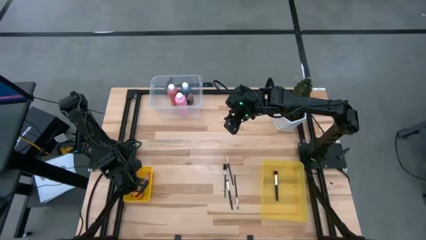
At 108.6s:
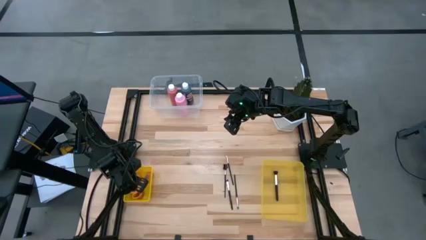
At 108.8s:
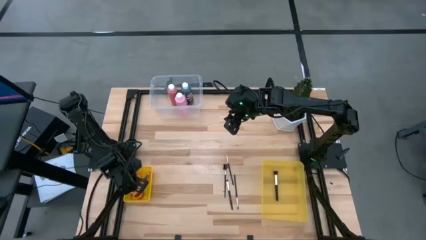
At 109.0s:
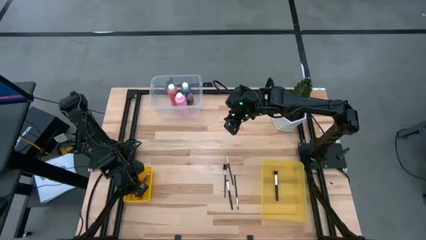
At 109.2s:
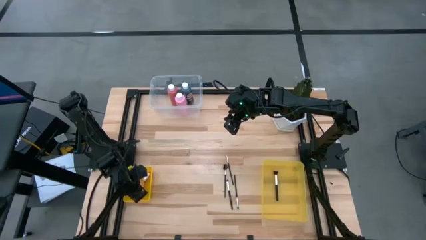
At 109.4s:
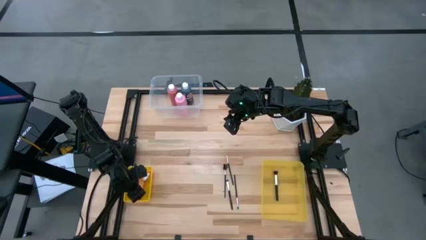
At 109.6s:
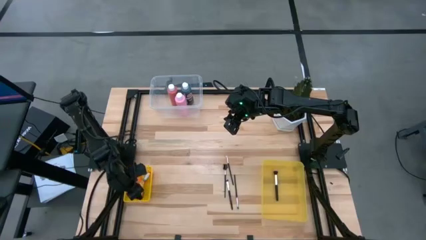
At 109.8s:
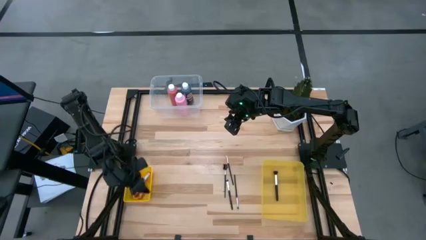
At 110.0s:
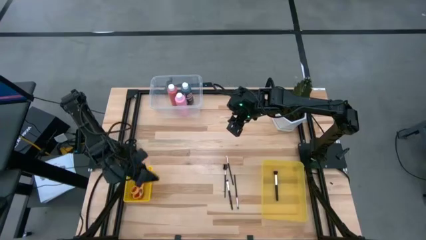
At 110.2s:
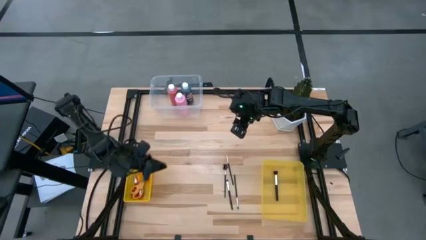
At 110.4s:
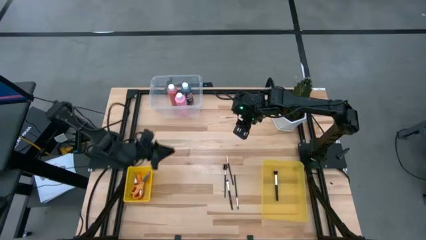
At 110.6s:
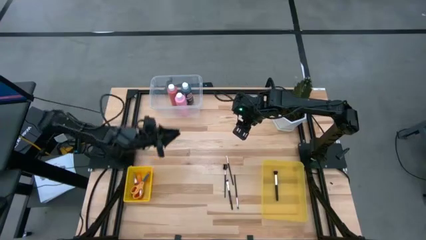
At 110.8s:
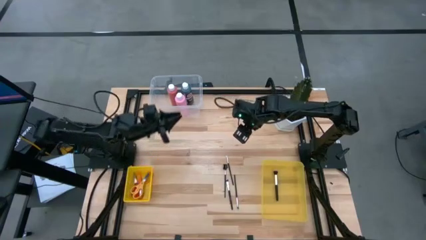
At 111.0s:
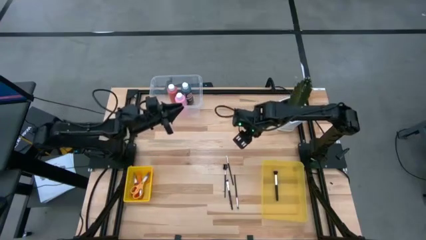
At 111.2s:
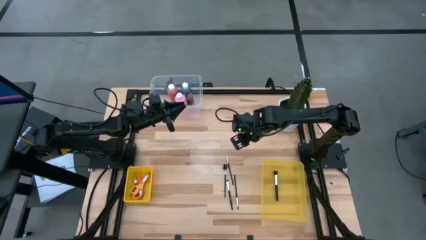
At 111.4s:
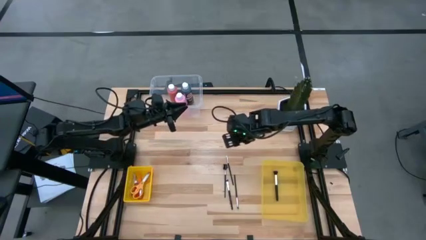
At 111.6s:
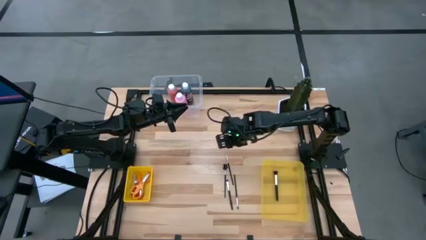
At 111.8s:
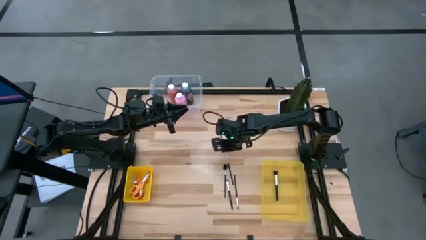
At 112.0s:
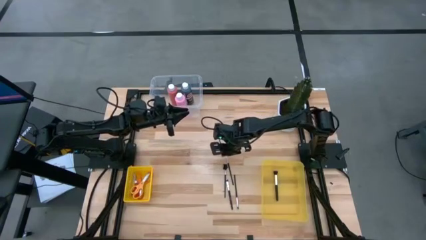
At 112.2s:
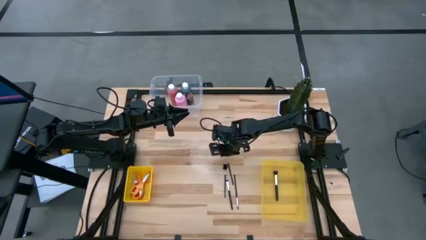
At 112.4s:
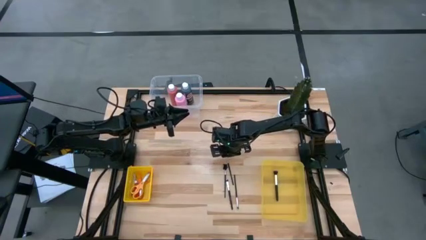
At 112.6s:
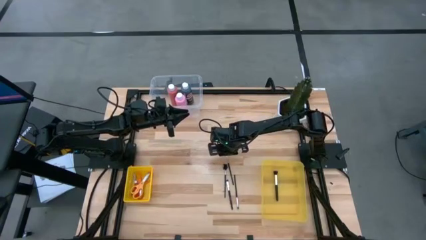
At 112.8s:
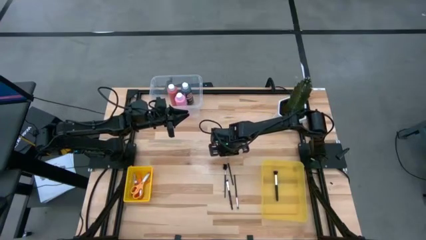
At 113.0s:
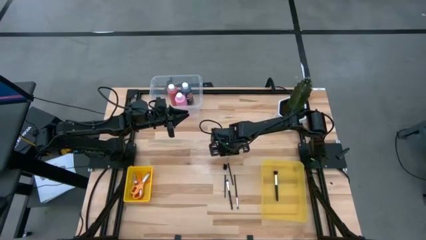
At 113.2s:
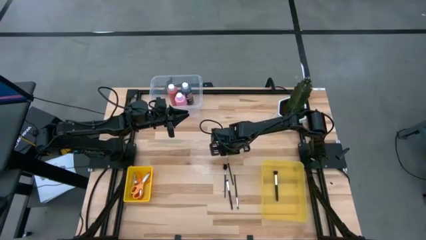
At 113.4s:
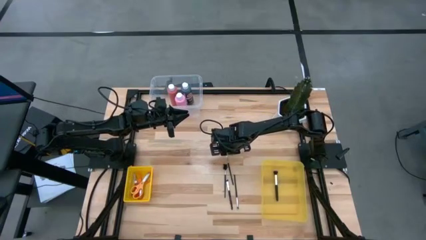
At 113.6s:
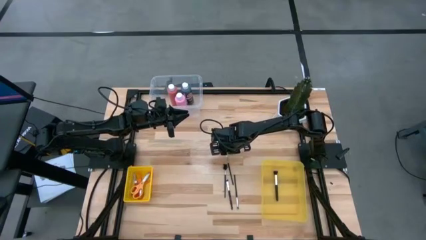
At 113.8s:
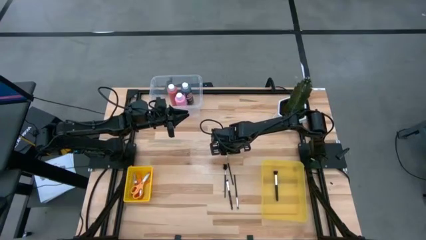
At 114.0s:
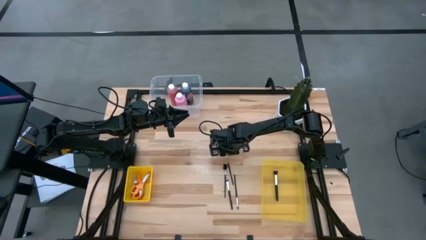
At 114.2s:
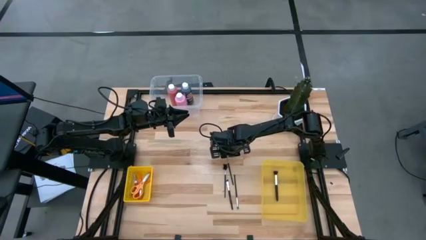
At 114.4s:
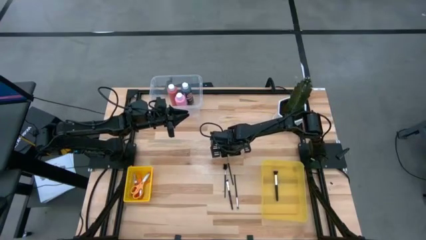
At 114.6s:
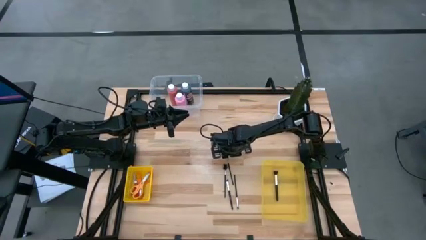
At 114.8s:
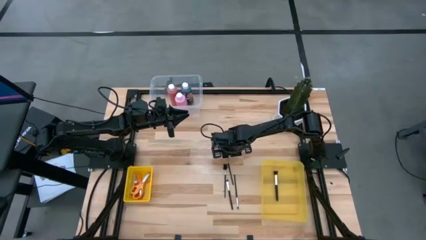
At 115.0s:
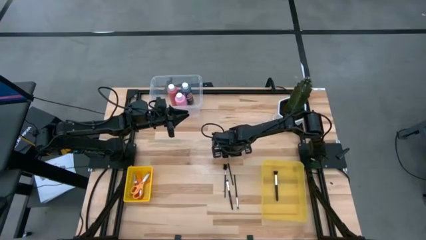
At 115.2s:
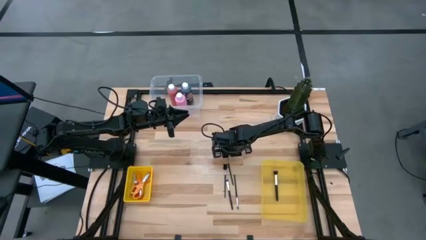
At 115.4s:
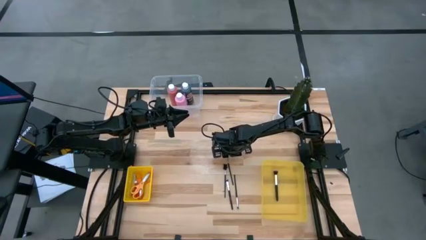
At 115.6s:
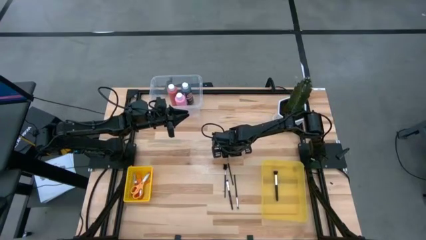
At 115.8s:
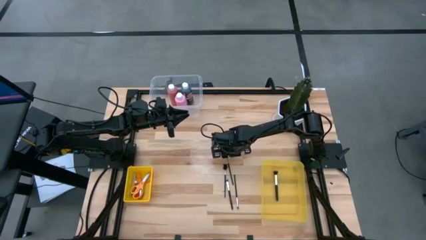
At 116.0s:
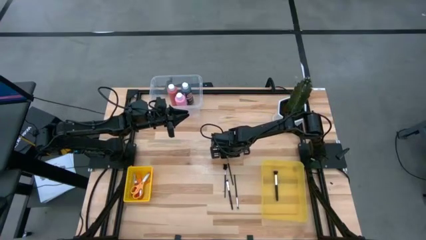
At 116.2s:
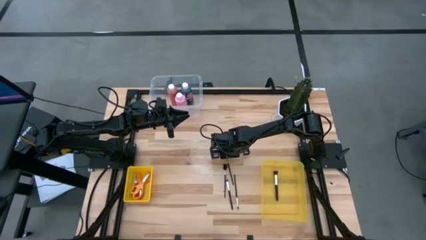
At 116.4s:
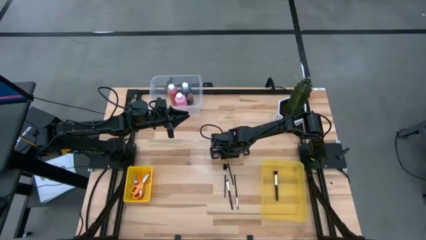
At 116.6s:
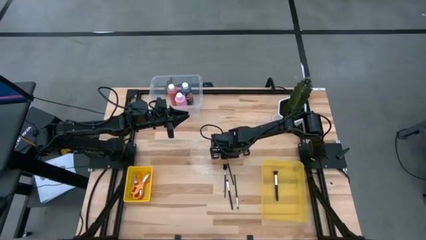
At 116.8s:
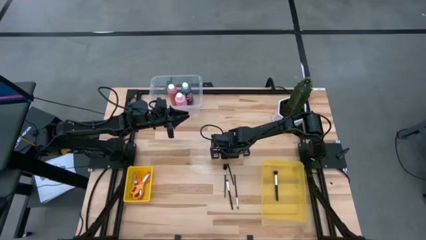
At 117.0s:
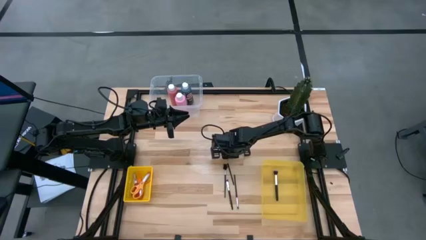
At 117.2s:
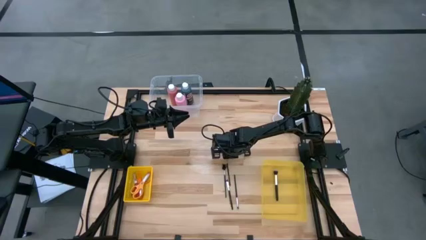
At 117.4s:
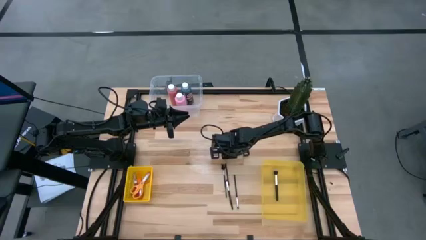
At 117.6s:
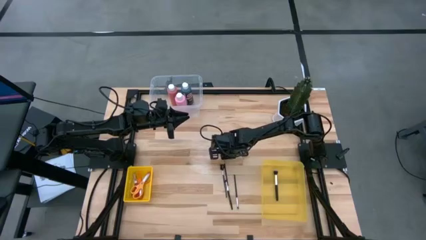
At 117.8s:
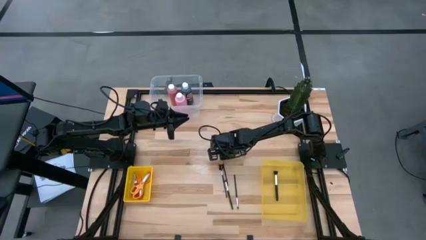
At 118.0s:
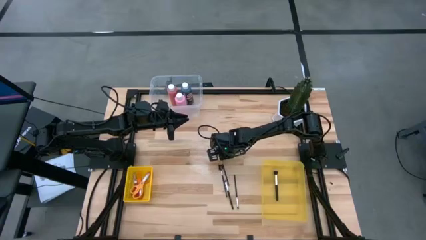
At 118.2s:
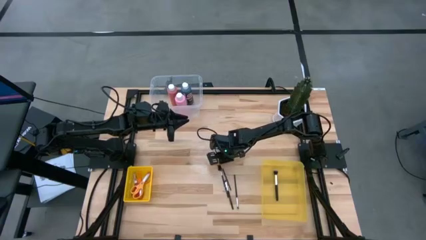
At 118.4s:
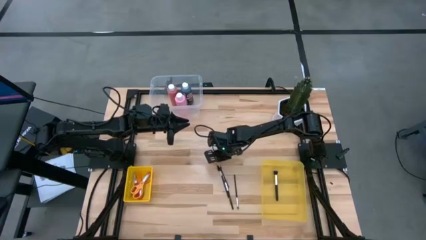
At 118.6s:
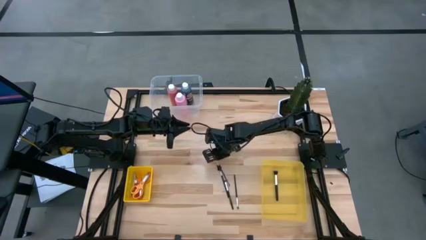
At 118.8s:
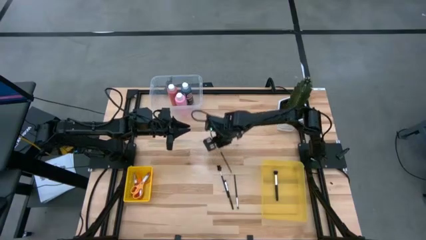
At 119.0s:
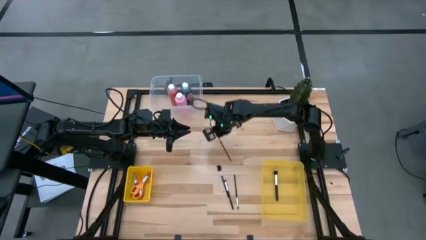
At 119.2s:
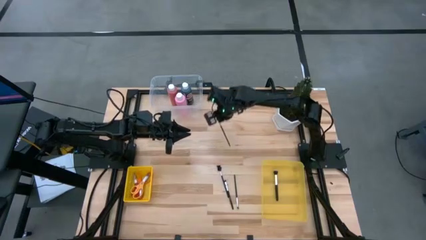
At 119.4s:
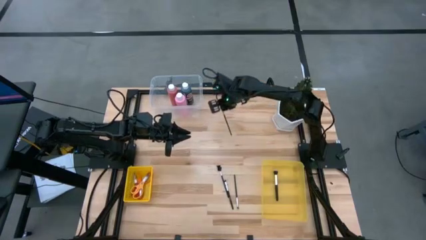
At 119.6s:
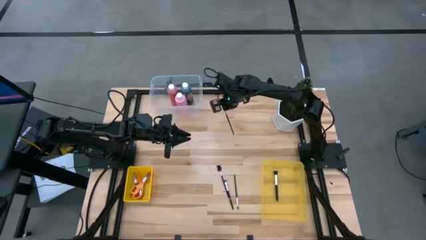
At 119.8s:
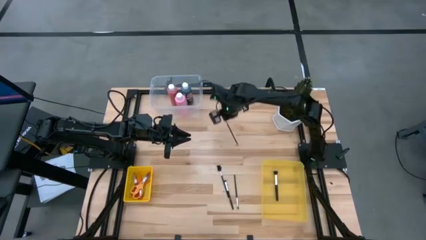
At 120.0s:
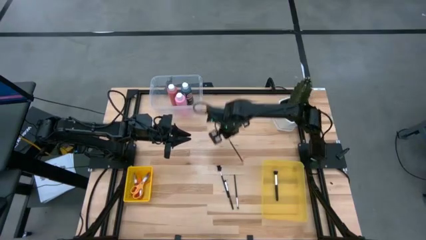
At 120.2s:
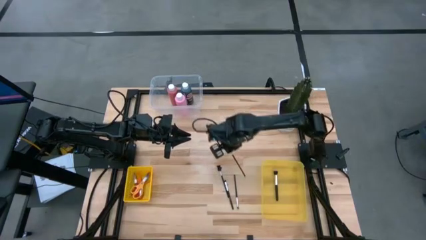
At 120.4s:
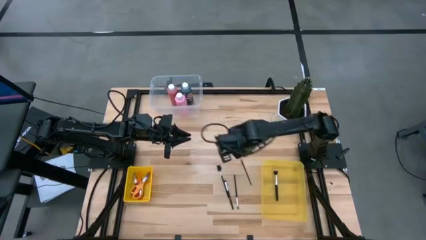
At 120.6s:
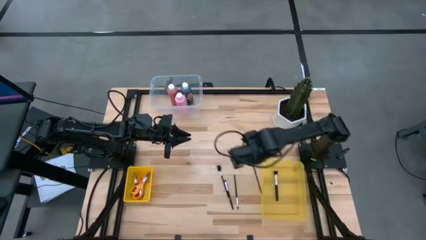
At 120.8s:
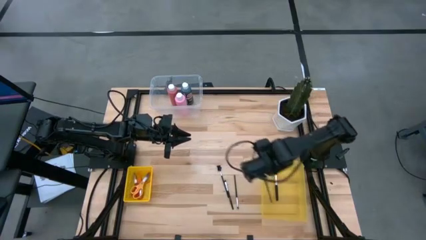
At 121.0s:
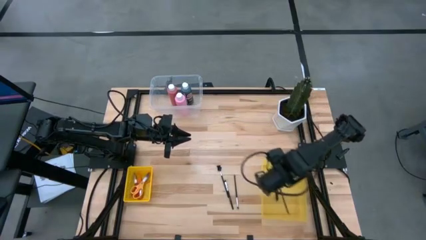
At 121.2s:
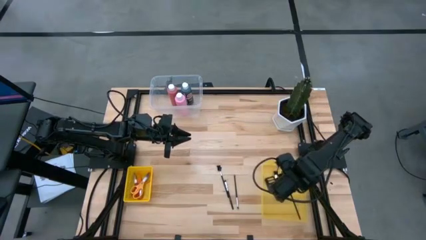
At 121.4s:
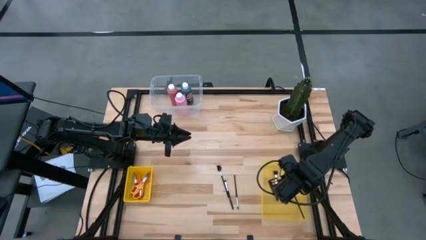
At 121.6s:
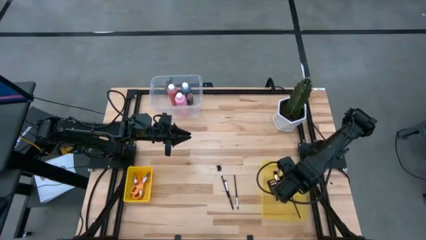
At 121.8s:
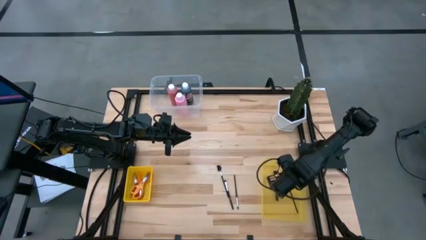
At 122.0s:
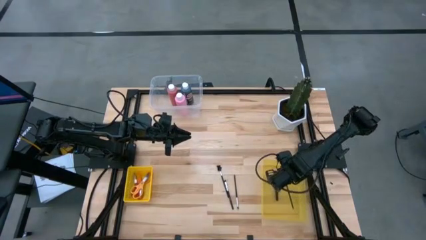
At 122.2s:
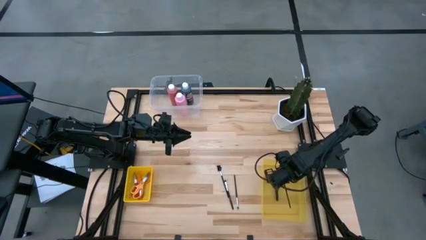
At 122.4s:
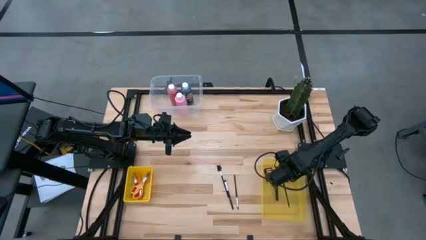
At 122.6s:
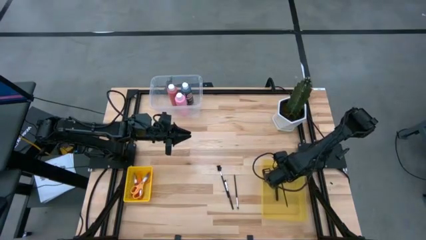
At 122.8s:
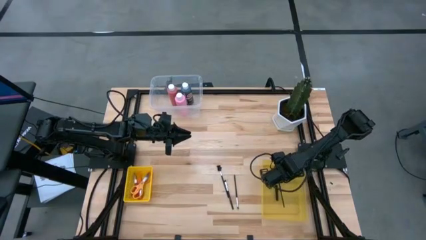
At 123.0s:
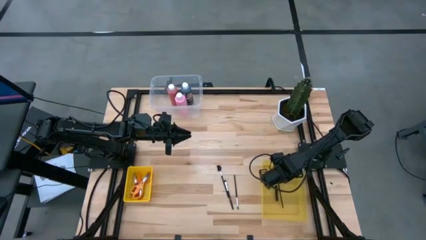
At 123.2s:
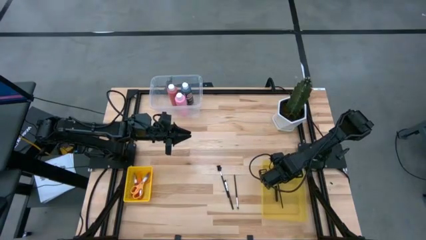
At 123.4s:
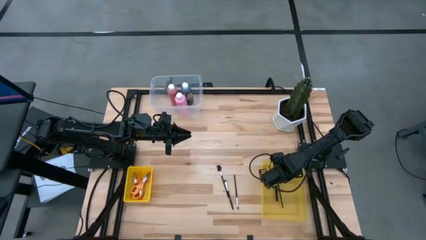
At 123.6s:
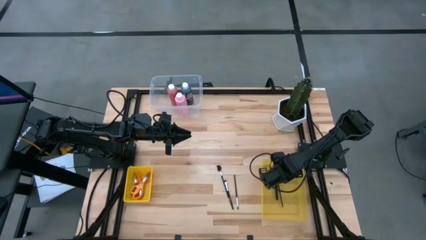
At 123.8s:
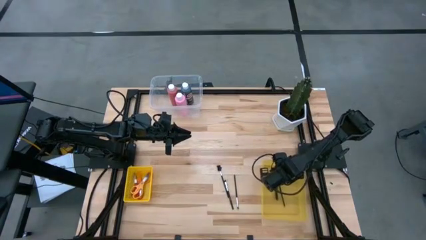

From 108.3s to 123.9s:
Task: Pick & Place Paint Supplies
Put the eyeshadow brush into the yellow bin

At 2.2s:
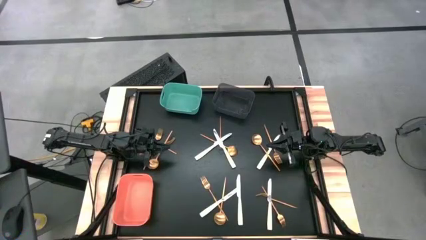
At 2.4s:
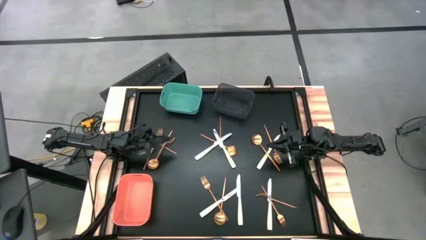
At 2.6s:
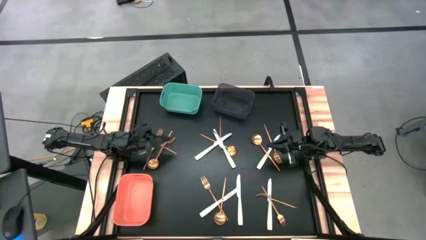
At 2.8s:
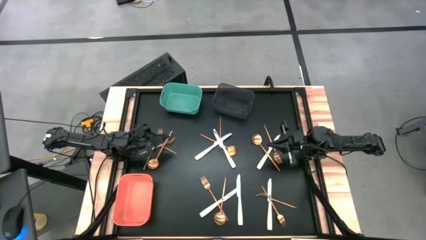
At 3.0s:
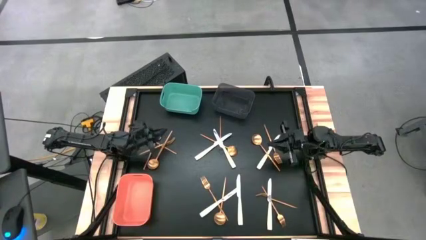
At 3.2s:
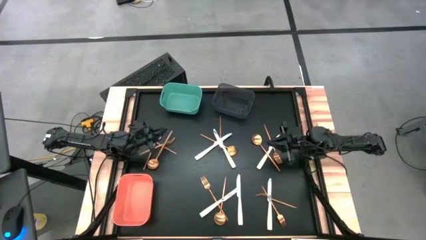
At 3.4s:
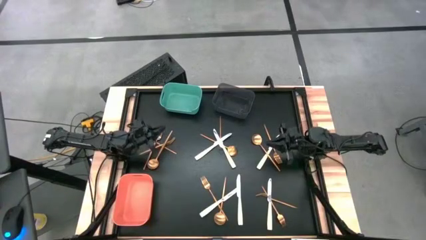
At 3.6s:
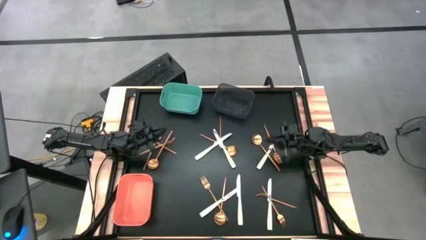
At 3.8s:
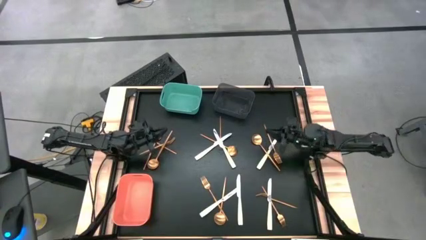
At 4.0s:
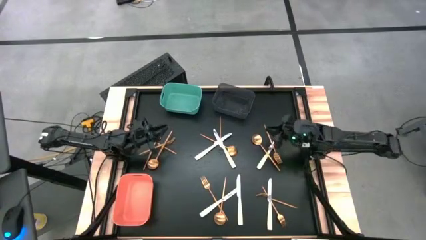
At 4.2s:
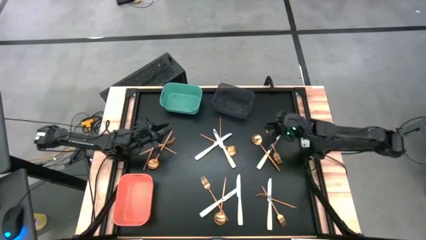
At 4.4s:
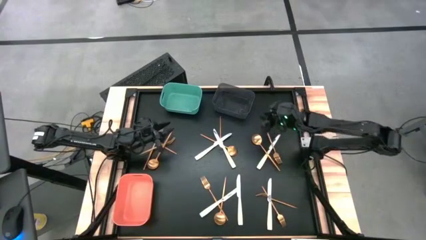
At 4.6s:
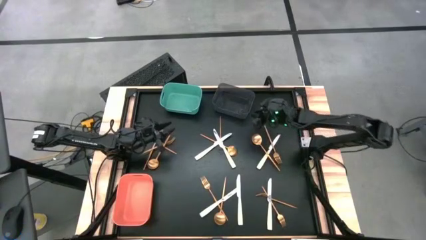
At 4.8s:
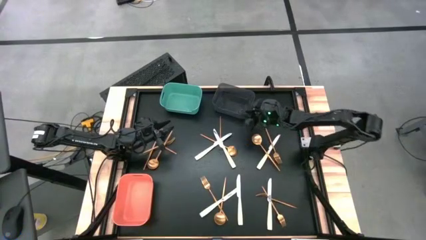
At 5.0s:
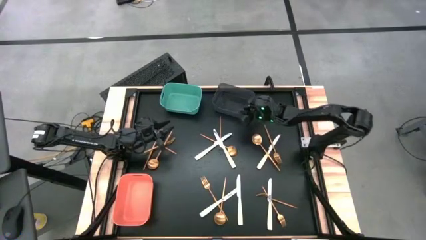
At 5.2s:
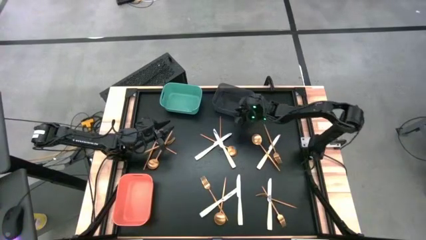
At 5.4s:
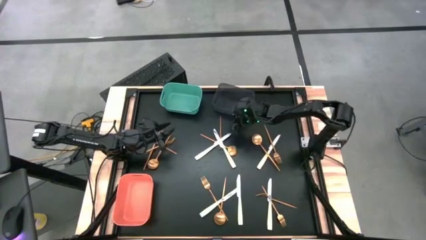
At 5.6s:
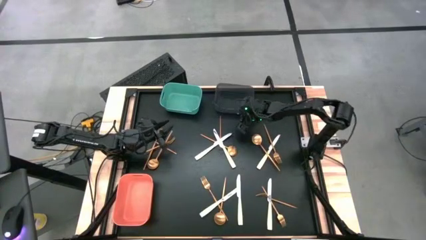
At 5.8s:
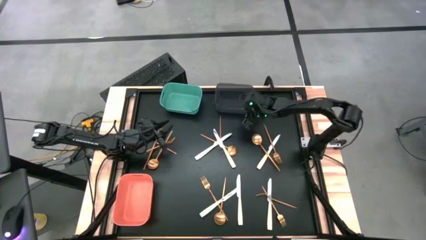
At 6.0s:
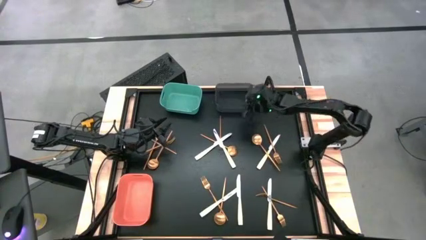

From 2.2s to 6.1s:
Task: Sort silverware by color (type)
Adjust the black bin
